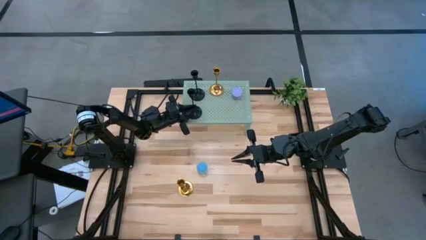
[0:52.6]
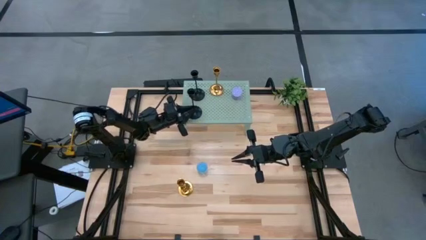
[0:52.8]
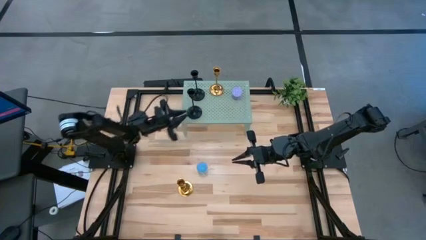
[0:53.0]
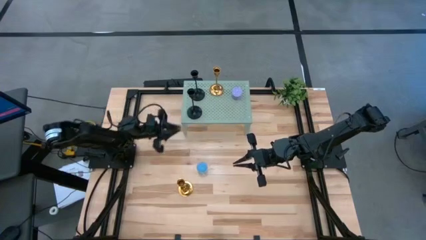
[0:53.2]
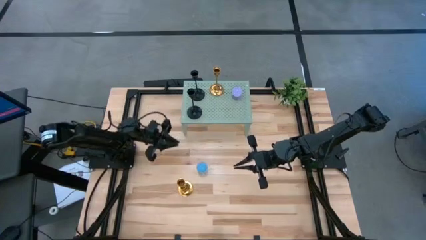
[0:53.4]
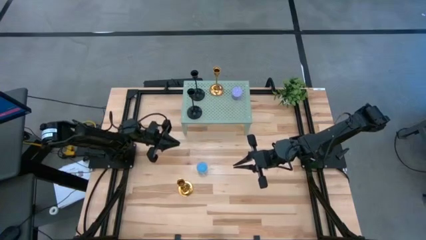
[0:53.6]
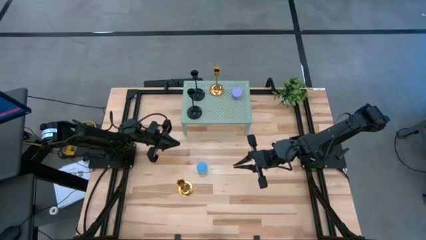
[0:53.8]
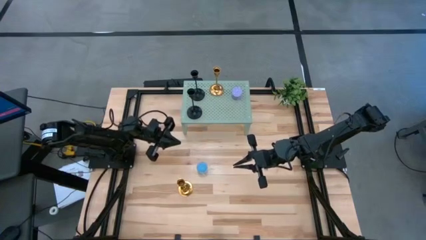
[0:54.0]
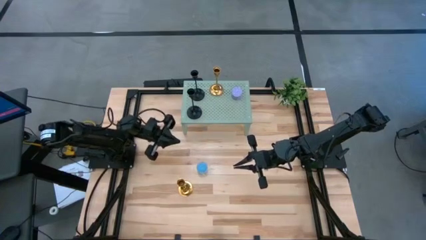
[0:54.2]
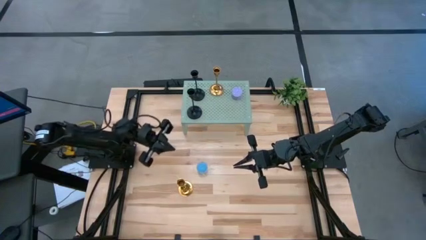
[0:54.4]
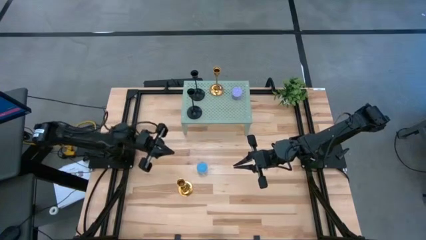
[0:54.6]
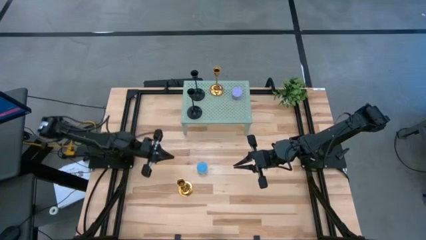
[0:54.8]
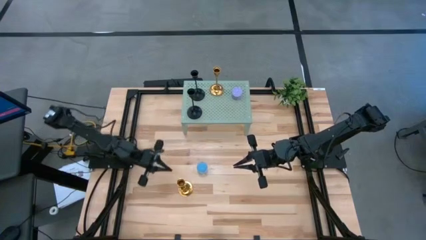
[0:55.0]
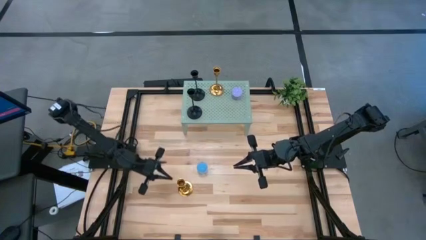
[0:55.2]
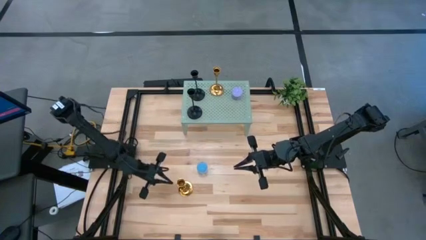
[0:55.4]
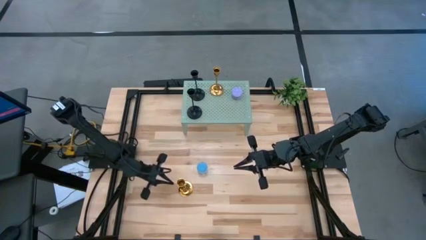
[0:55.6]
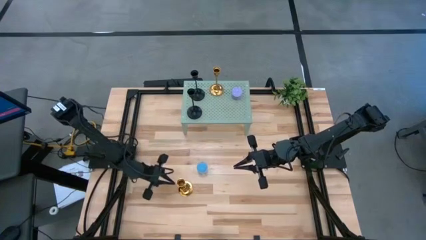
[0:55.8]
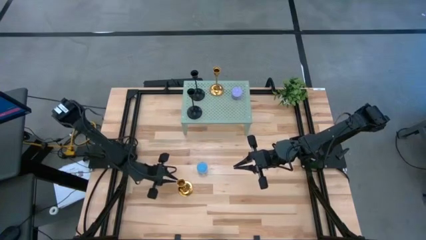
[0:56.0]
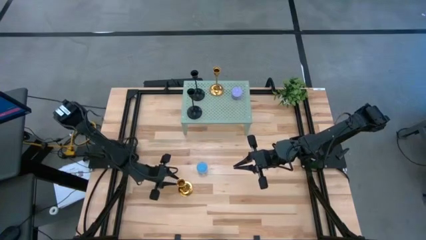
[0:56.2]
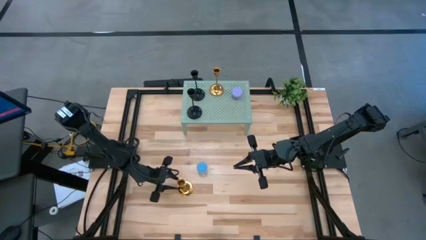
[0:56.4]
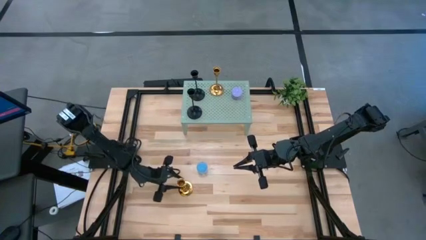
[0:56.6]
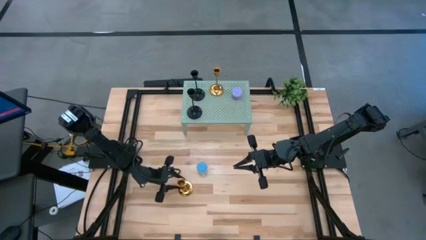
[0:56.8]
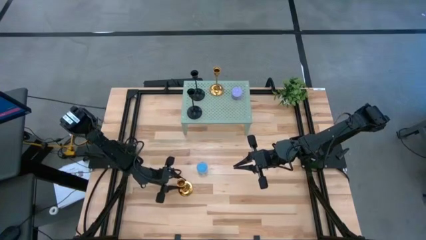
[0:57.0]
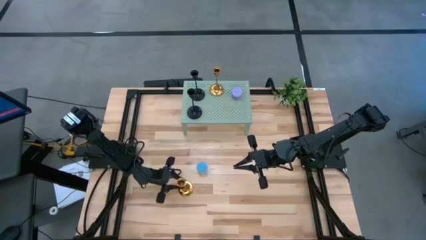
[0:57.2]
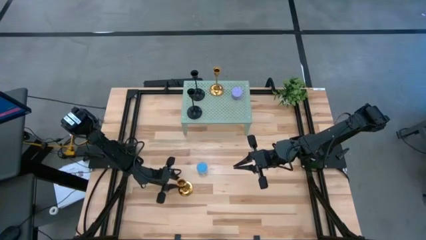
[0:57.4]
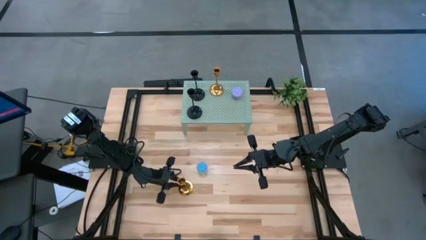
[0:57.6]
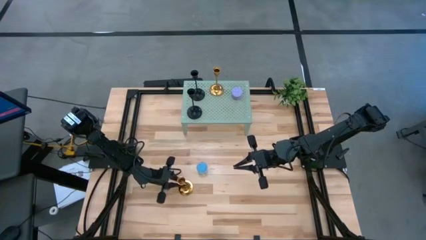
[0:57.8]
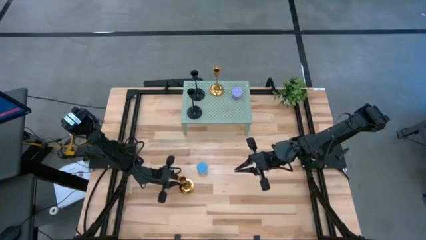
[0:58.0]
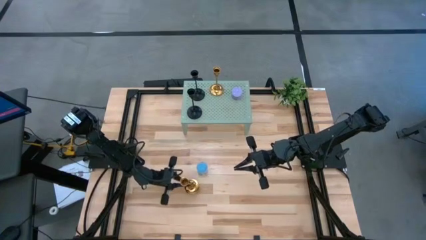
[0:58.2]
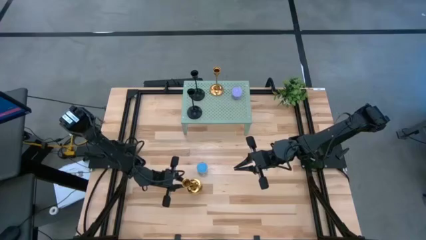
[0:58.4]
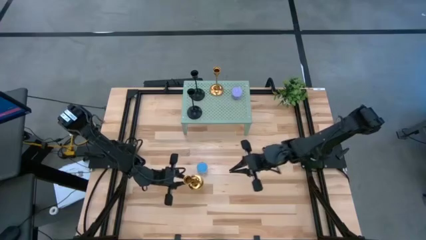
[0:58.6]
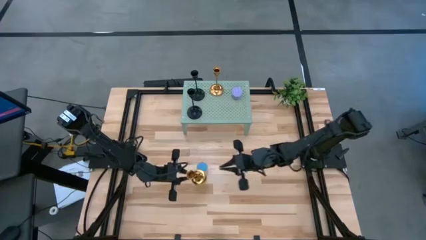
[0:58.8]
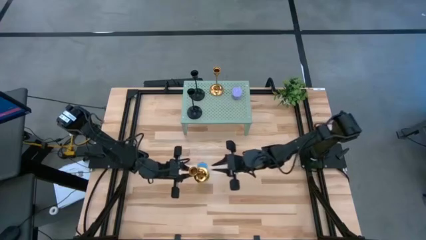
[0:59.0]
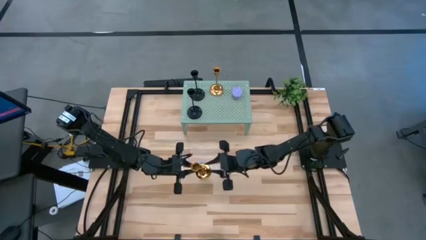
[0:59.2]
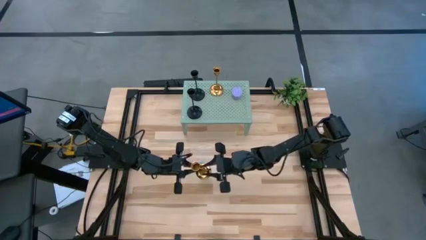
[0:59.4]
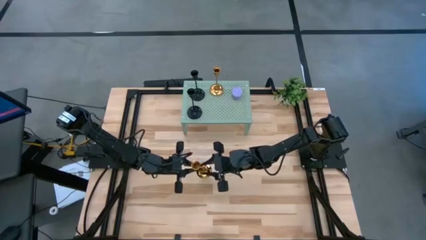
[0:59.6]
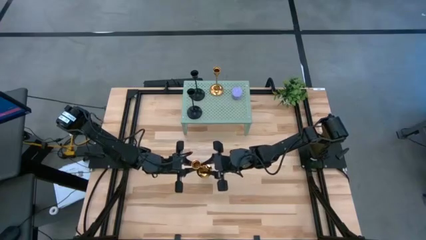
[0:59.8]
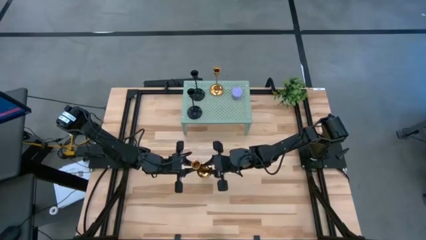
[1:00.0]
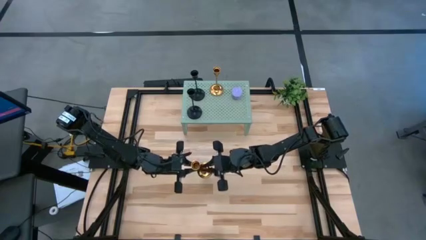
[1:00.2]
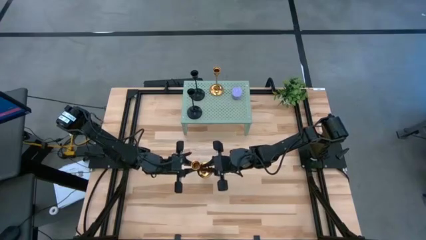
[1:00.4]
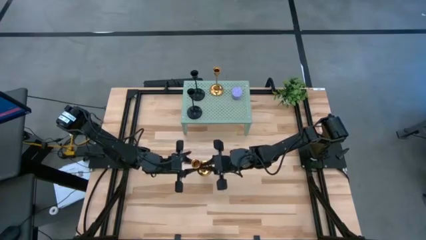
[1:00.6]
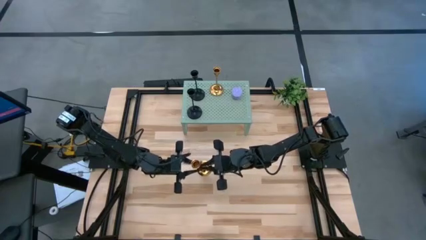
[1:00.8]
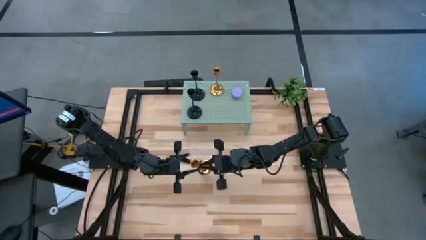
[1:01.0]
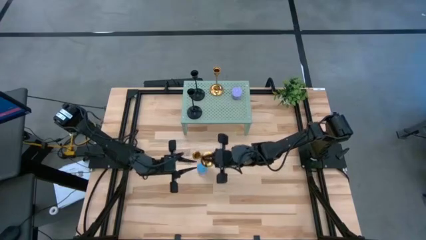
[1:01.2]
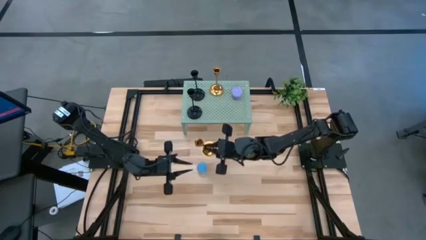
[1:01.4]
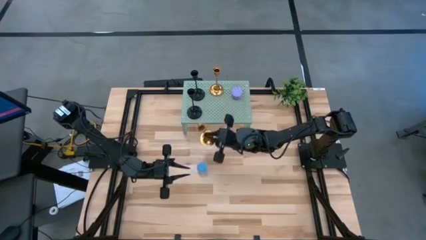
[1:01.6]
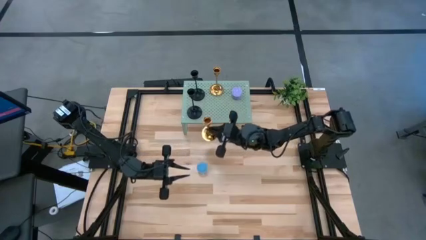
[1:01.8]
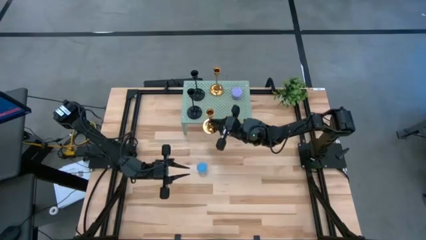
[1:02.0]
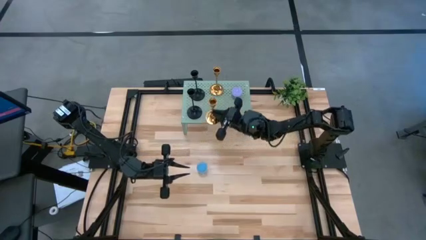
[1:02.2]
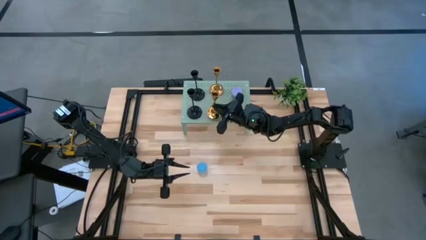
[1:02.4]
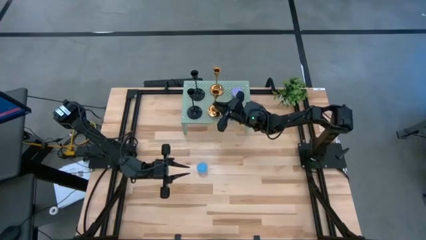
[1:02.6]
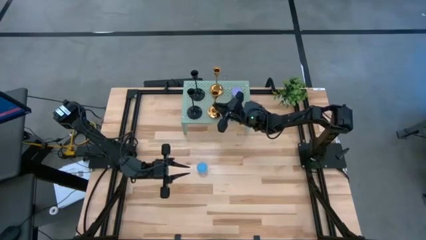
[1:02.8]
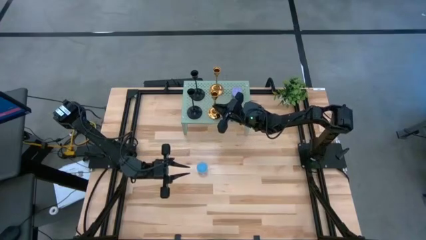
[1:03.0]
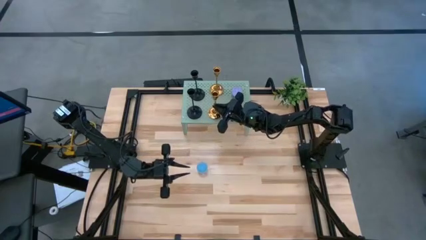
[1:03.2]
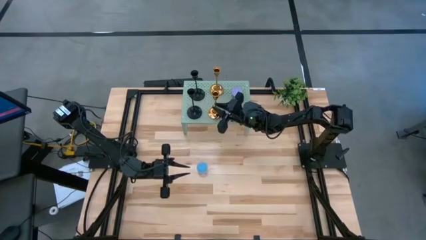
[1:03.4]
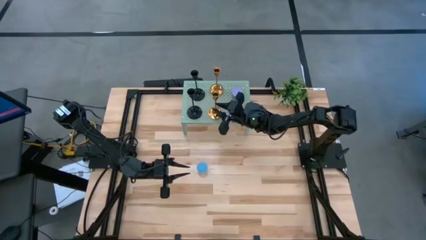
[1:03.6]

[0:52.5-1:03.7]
Task: Pick & Place candle stick holders
Put the golden candle holder on the shelf aligned with the golden candle holder

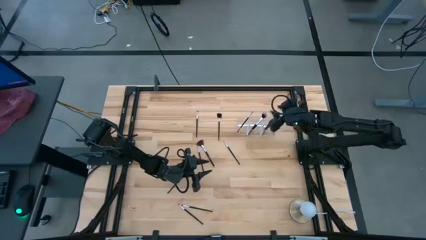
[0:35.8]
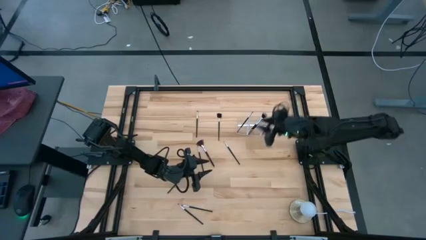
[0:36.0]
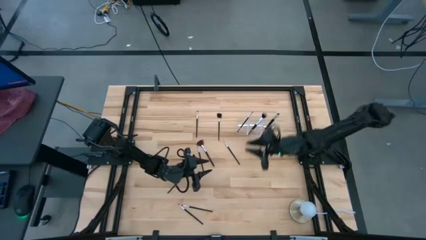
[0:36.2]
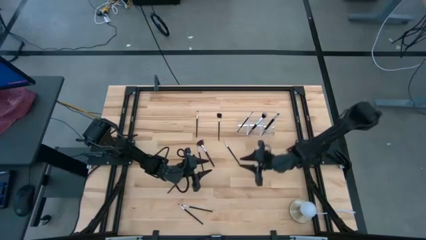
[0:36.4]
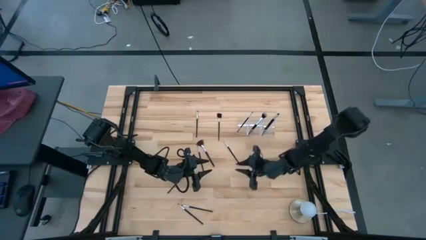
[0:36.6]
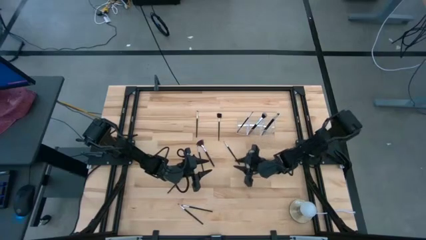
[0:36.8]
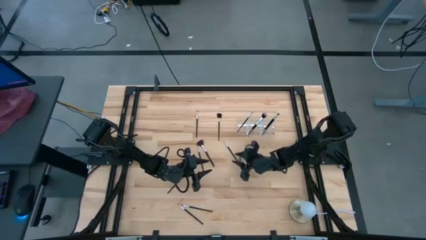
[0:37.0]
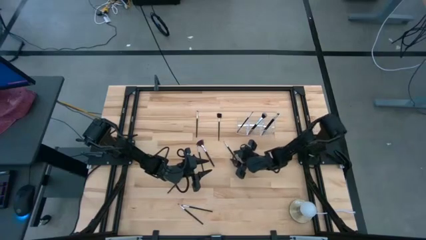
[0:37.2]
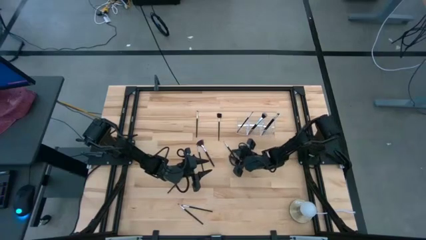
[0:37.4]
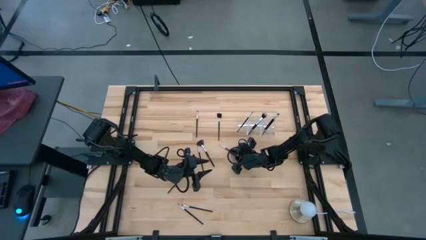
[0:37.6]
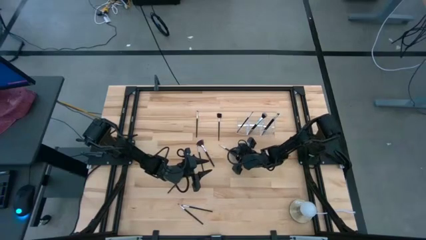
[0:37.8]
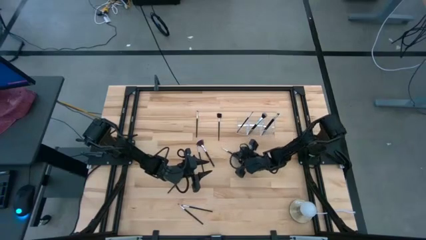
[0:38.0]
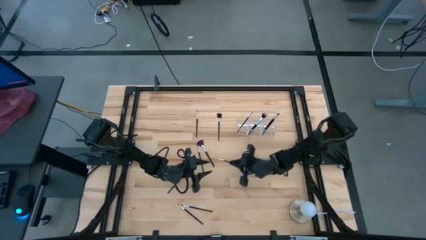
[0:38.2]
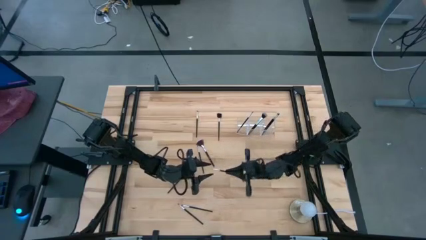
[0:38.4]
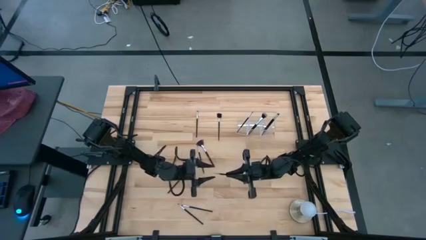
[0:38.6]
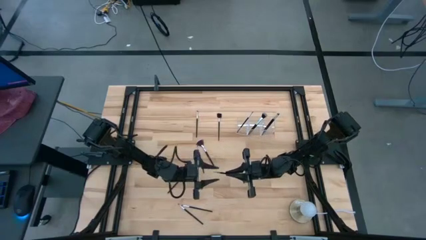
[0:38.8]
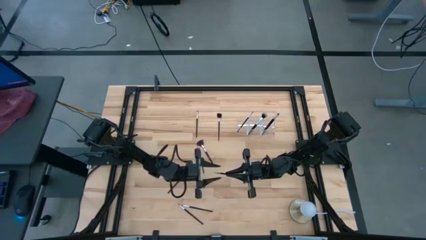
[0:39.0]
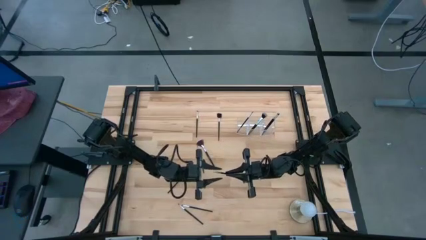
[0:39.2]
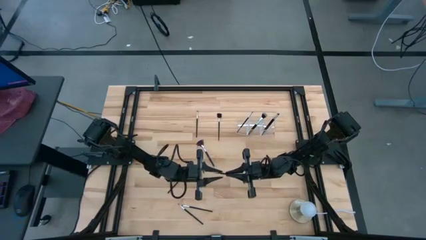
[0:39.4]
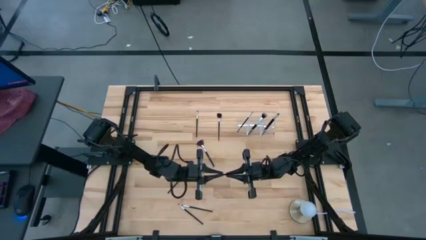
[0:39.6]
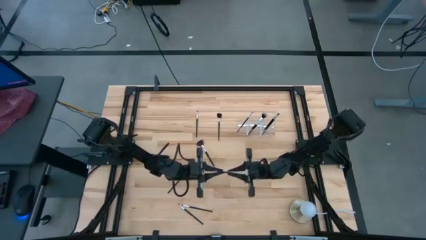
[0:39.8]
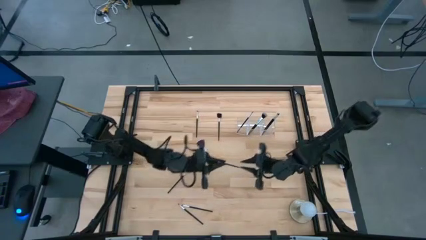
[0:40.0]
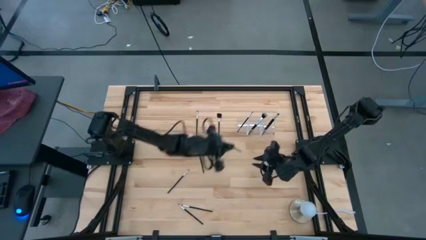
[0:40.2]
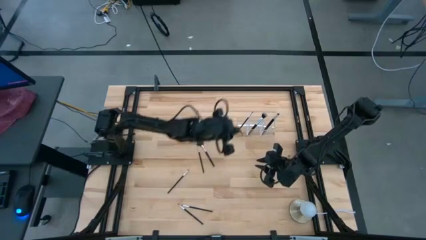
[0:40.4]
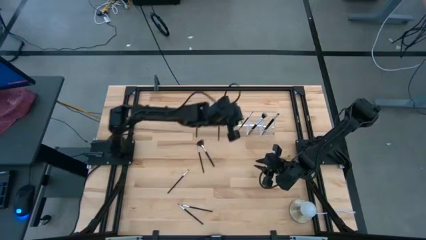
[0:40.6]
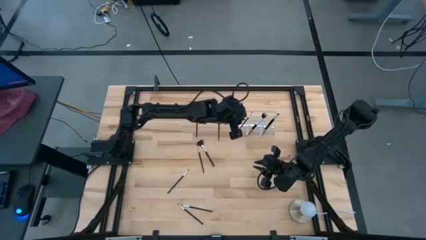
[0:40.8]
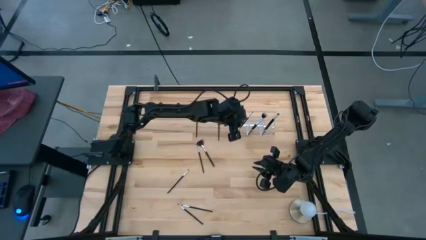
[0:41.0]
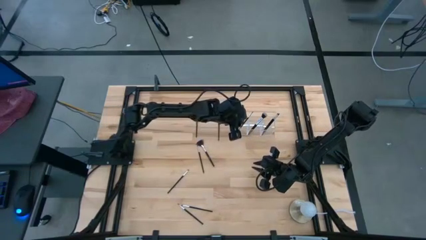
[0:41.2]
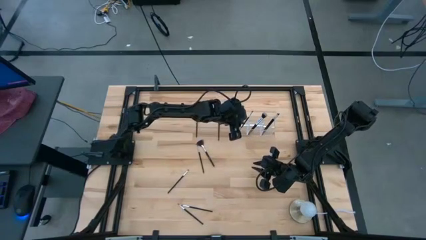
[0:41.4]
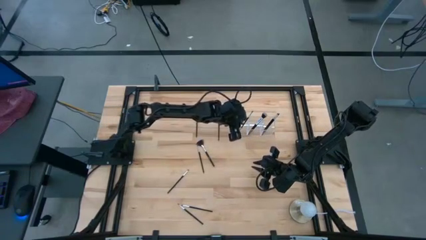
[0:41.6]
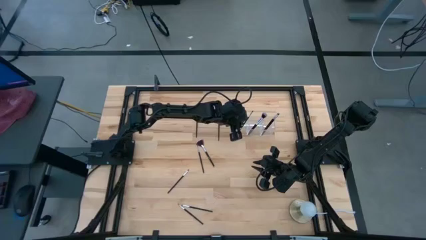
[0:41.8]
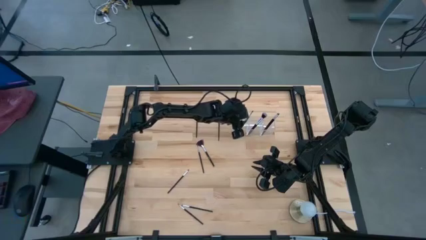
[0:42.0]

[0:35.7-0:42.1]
Task: Put items in baskets/containers
Put the black liner brush into the transparent organizer

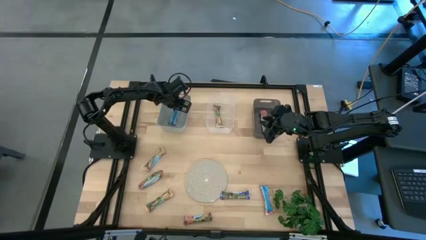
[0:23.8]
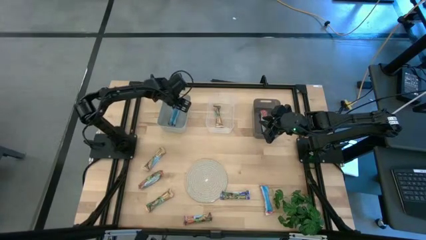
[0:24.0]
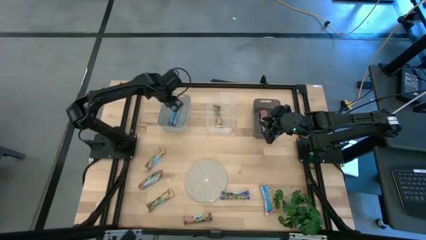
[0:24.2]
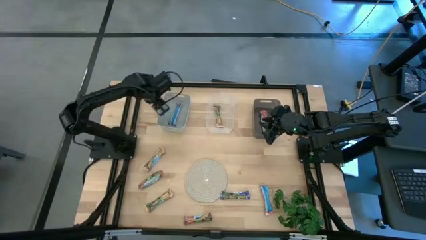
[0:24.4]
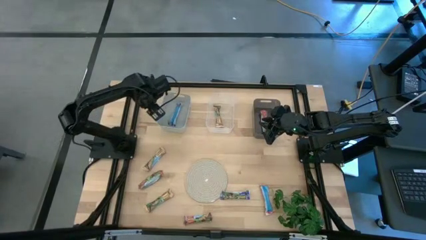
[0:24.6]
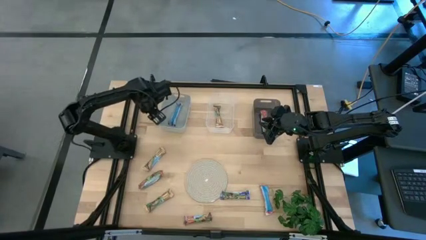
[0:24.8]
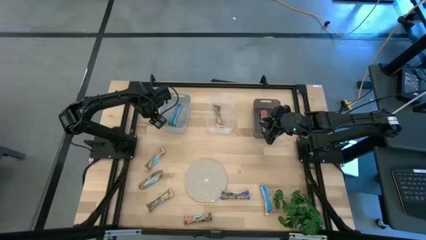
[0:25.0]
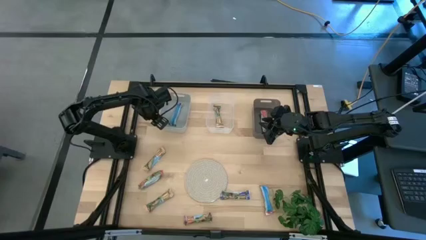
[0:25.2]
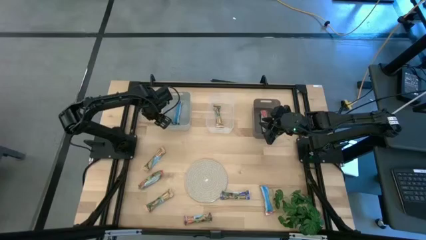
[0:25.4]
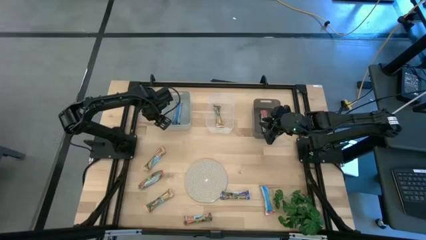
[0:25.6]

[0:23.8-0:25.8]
Task: Pick and place Granola Bars by type
Adjust the gray bin
